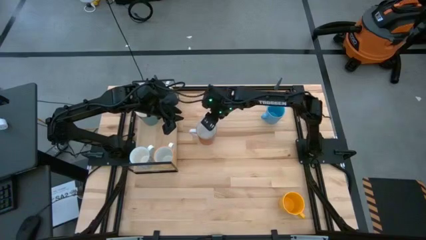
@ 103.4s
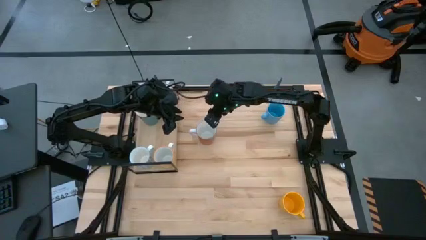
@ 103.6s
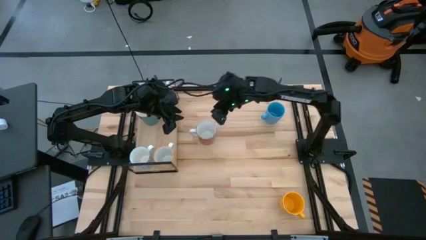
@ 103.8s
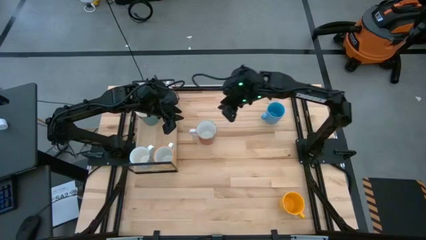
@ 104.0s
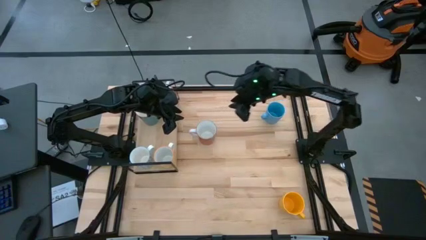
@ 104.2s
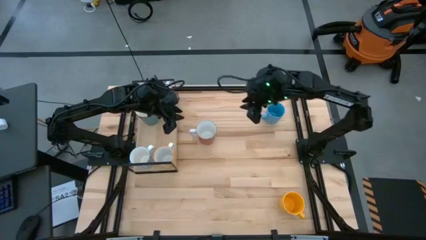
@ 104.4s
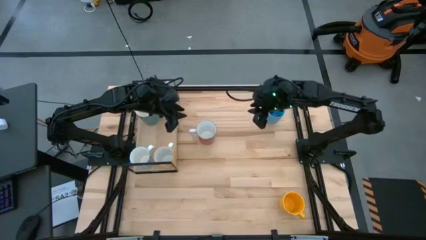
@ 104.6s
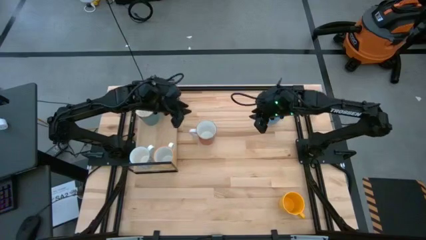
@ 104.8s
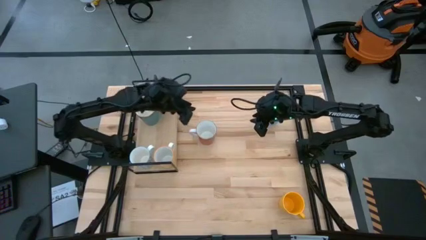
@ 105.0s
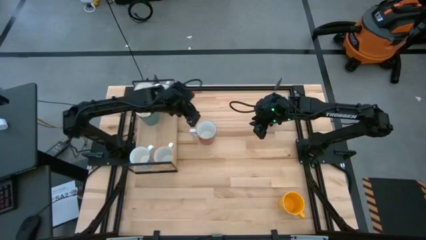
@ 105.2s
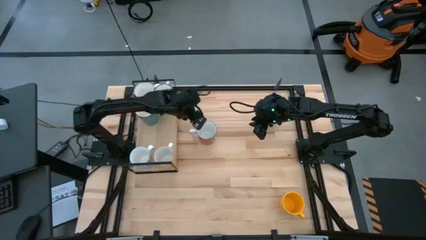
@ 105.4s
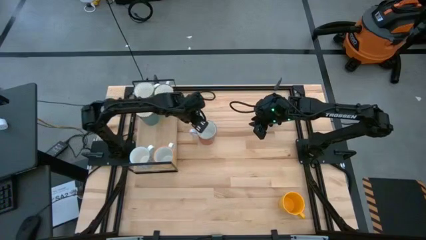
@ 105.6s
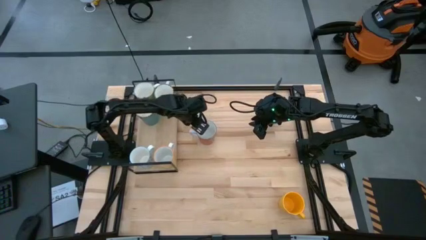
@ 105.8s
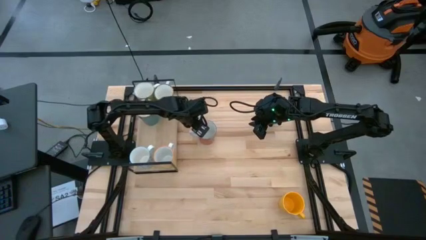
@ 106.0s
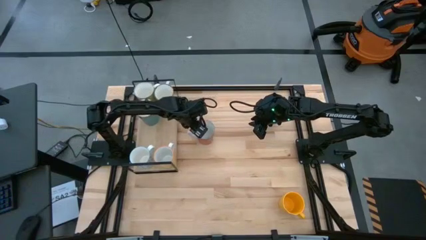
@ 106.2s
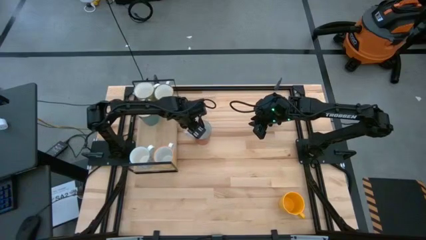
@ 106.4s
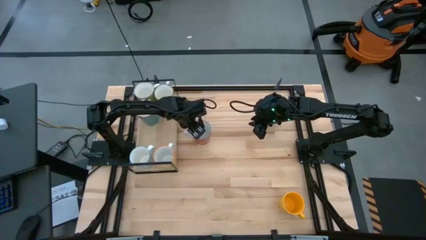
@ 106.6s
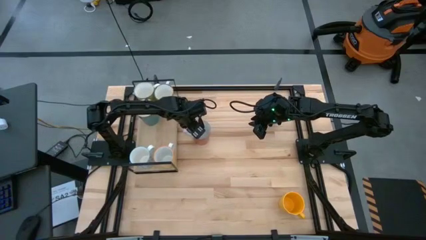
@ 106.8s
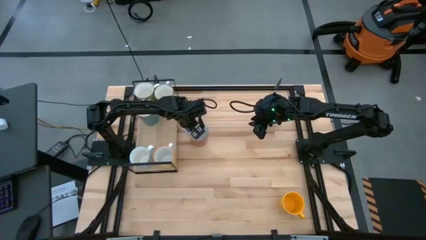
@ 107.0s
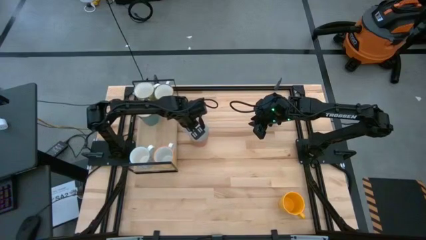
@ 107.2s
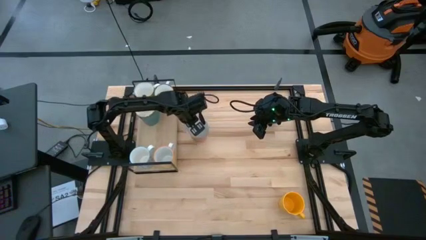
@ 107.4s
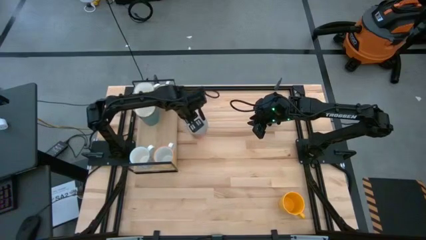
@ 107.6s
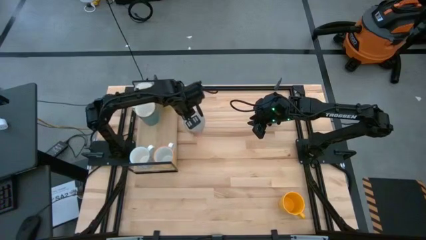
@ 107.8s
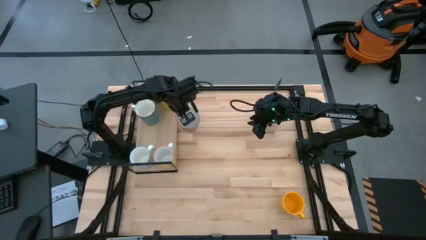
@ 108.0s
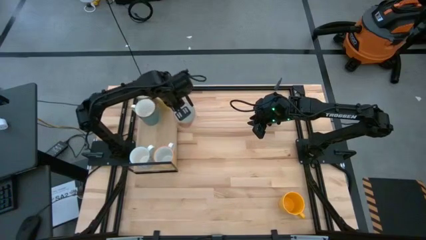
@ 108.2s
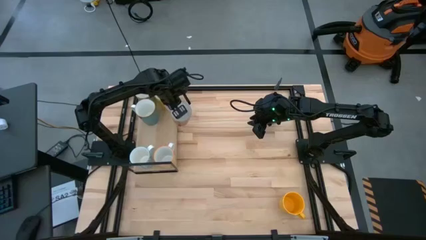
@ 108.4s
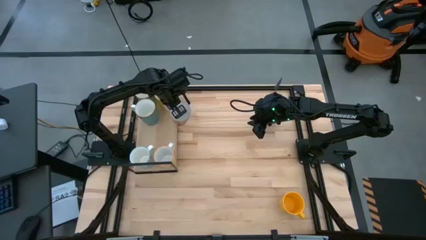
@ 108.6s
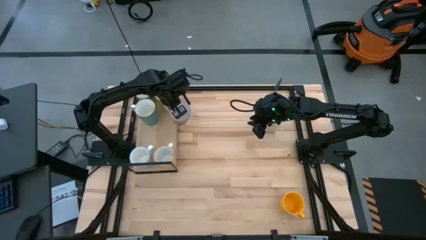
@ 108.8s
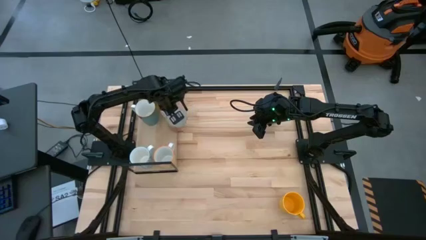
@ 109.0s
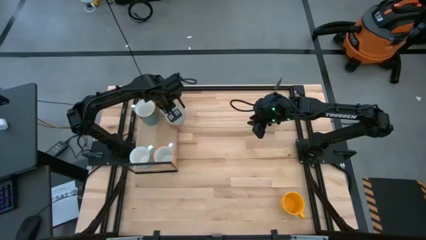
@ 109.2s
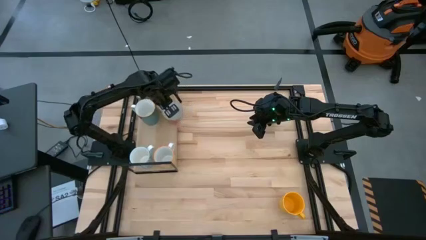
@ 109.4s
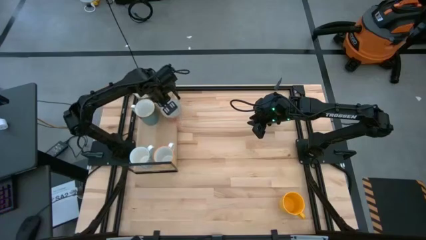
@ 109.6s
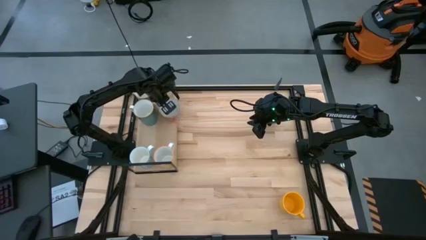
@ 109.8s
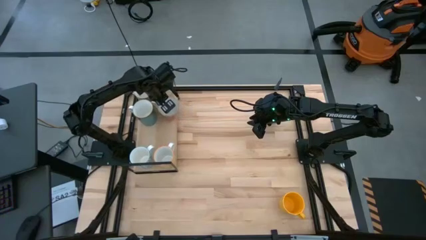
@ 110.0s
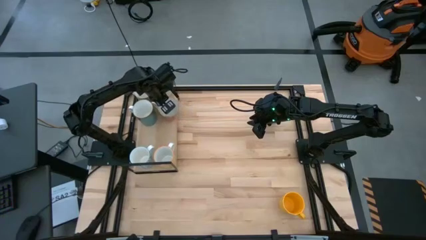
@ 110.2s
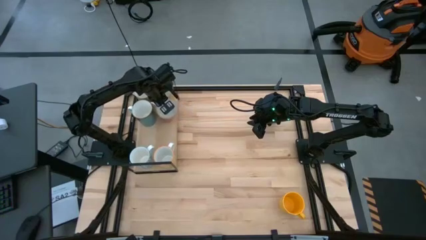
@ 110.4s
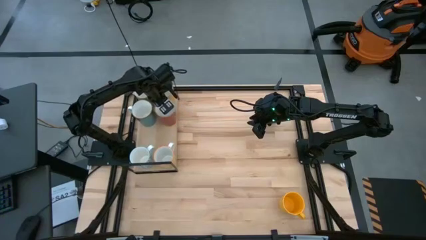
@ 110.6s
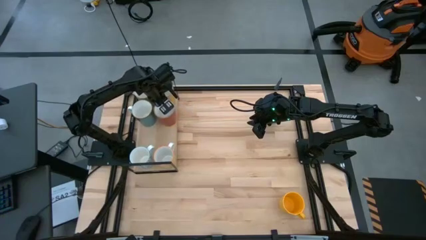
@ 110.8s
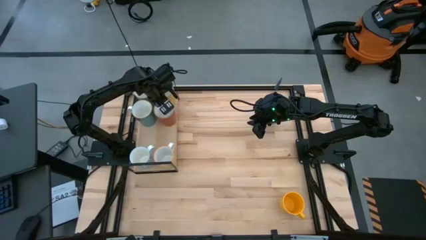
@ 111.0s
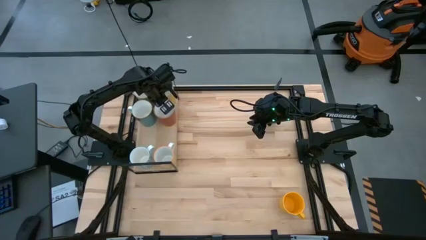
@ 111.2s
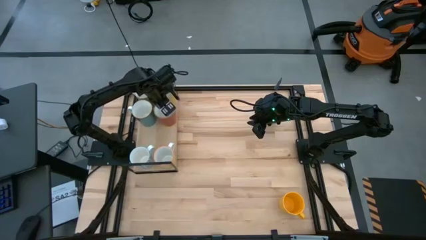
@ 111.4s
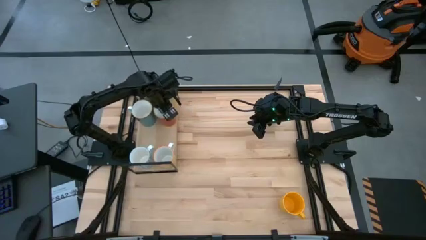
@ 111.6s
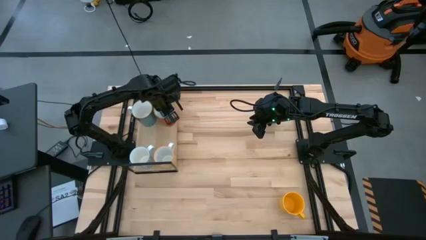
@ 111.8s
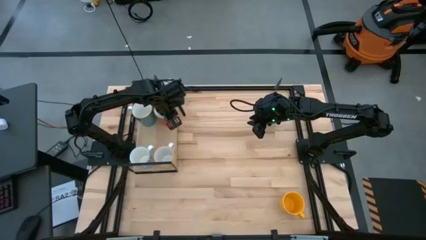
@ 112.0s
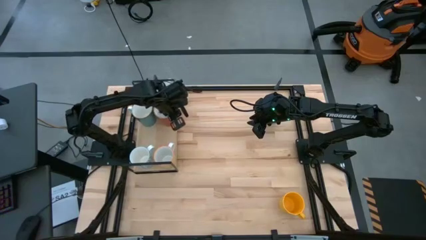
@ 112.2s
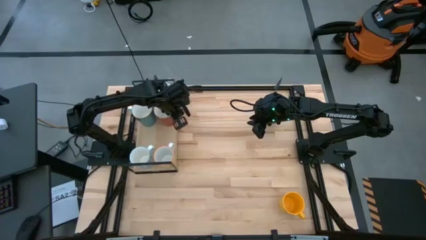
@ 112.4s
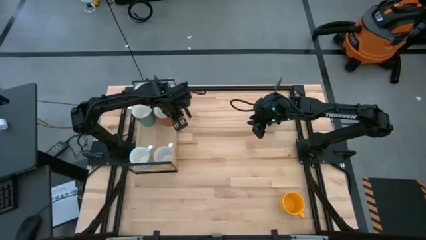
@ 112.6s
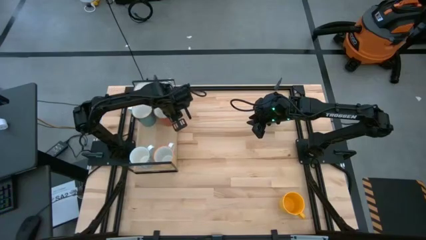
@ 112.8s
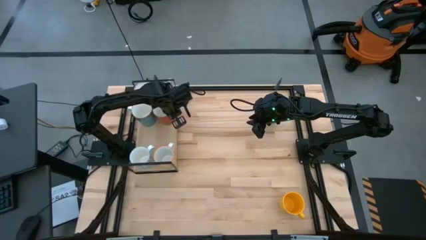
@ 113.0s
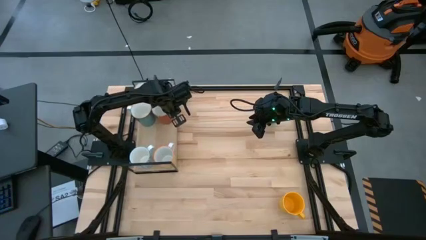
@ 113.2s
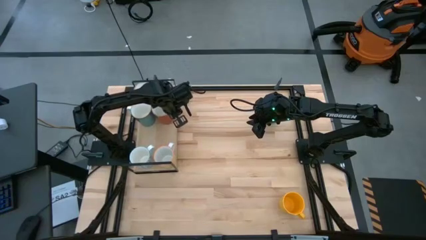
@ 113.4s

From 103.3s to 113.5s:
Task: Place coffee mugs
Put the red mug on the shelf

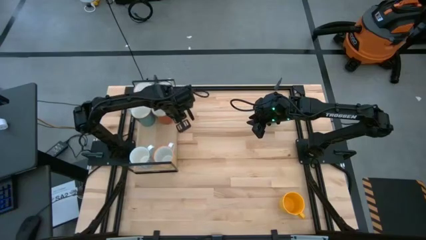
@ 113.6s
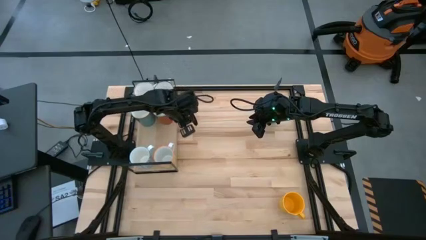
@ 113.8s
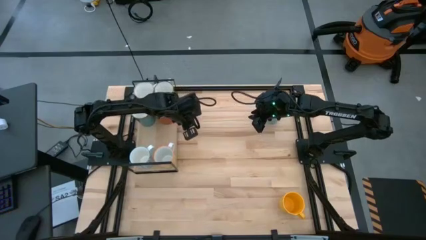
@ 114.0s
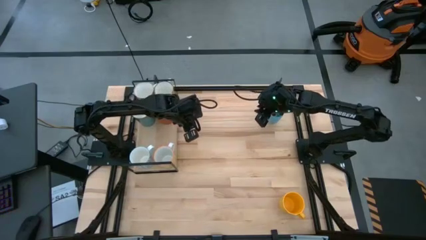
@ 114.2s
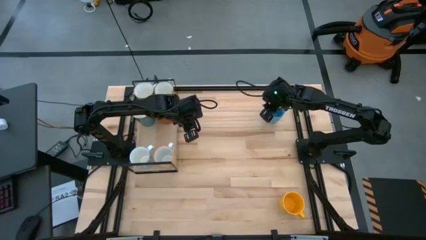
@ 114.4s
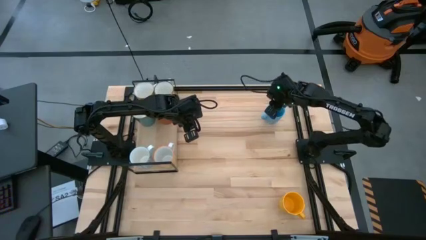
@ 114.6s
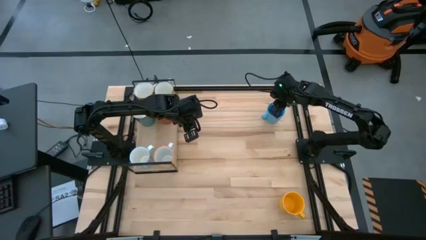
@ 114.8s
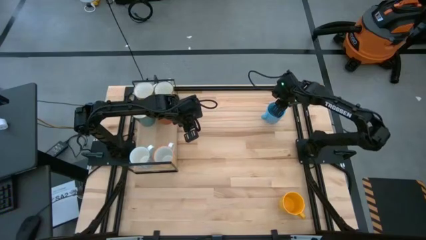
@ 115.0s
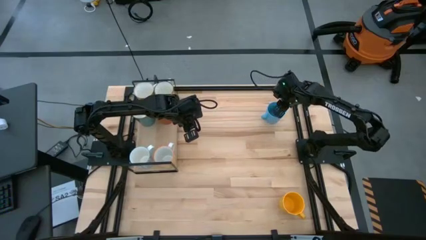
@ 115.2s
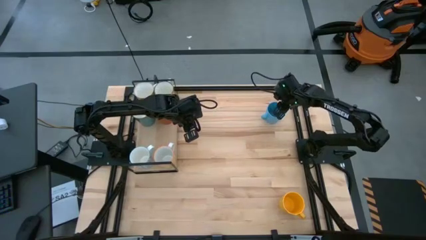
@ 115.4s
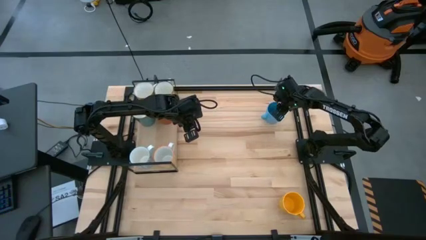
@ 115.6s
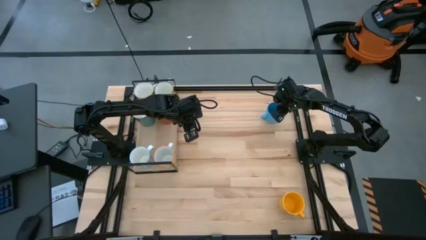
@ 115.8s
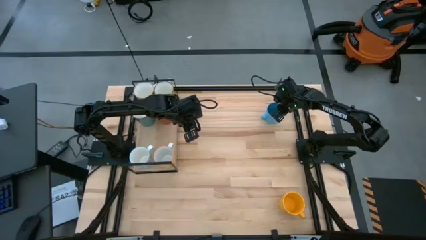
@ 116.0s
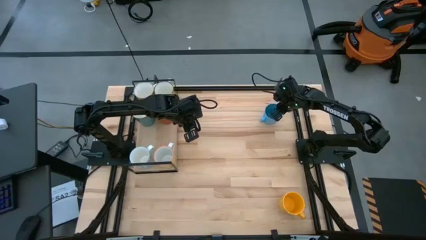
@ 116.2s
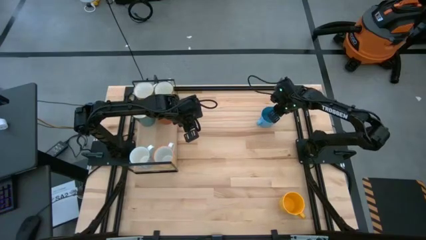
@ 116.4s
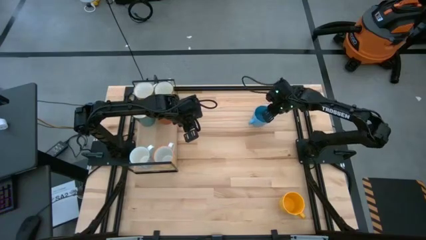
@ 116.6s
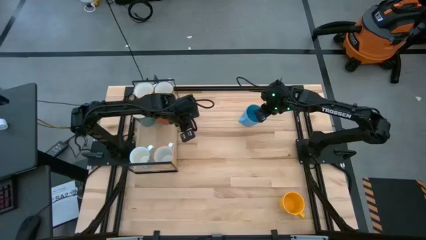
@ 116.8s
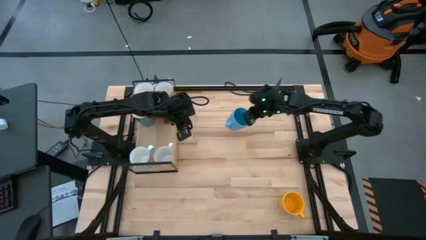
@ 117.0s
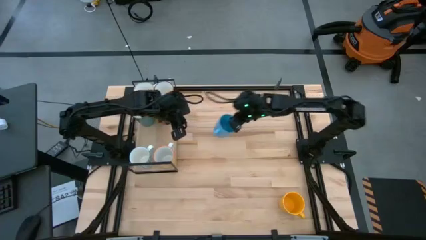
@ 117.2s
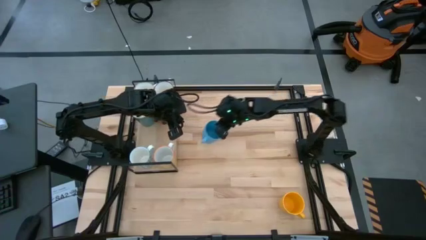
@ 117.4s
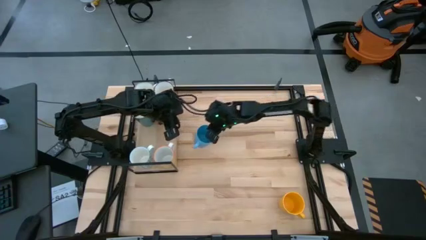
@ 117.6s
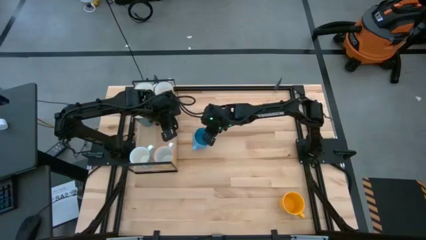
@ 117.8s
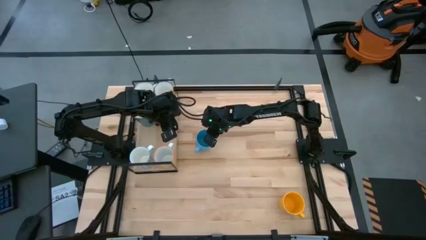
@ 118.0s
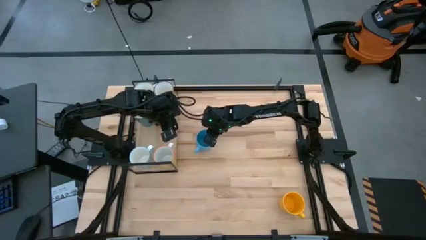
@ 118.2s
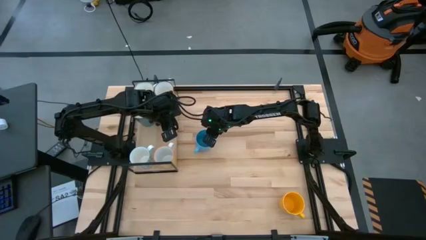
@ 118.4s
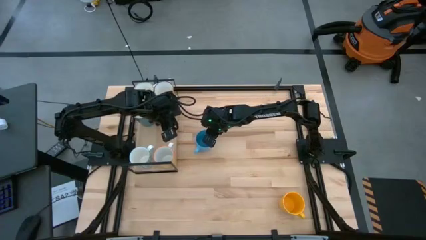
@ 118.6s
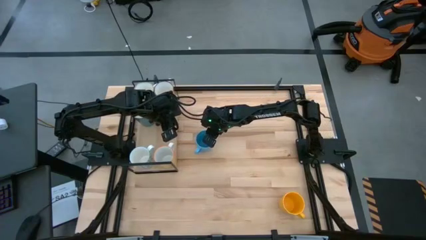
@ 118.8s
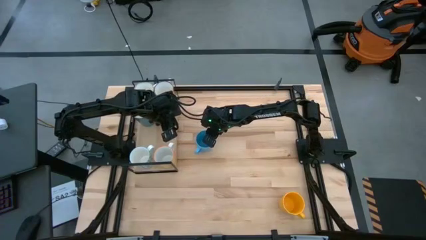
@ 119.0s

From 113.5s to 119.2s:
Move the blue mug to the center of the table

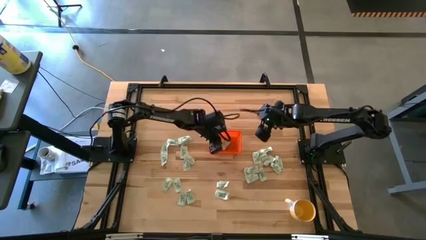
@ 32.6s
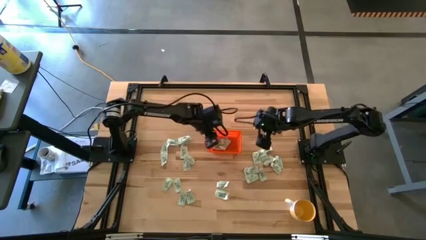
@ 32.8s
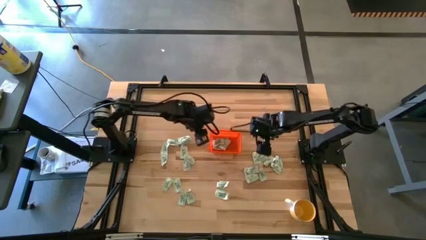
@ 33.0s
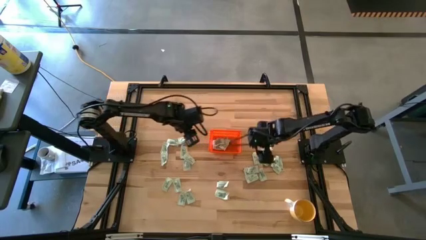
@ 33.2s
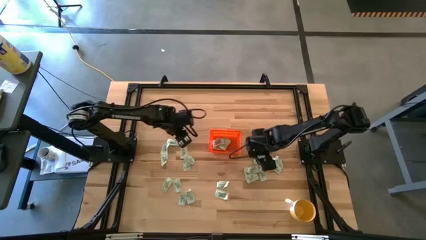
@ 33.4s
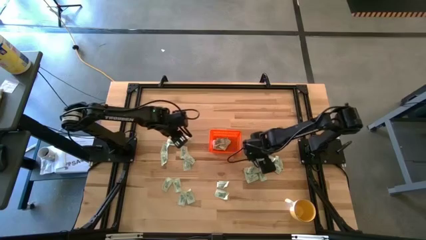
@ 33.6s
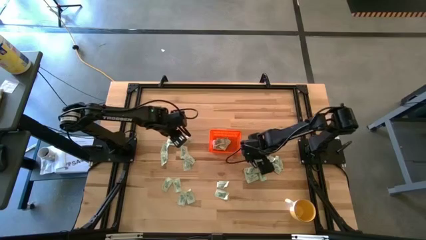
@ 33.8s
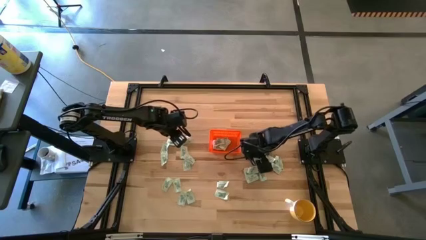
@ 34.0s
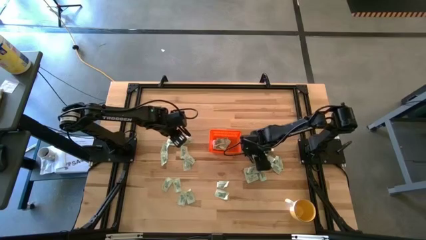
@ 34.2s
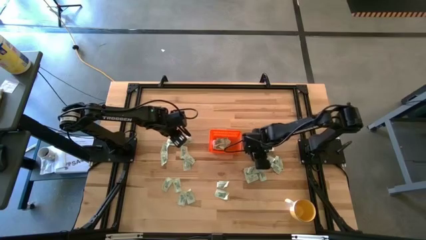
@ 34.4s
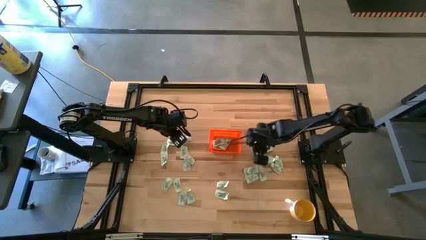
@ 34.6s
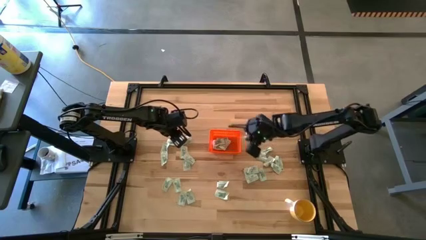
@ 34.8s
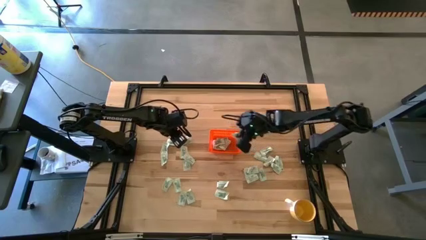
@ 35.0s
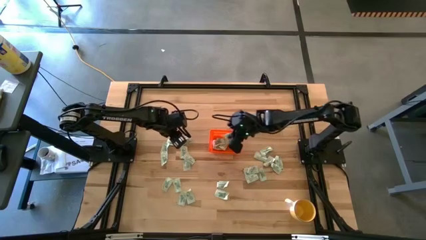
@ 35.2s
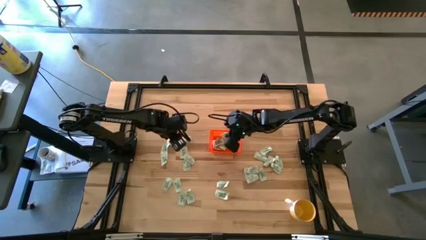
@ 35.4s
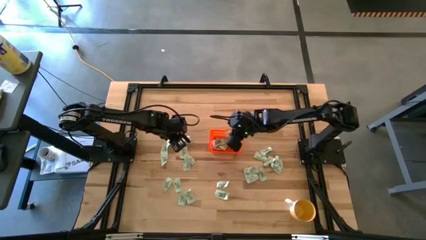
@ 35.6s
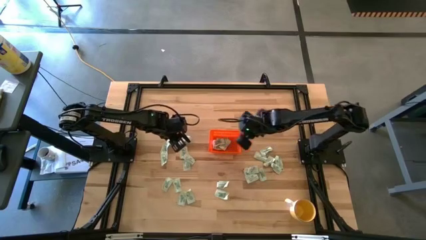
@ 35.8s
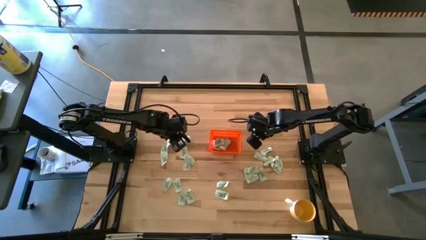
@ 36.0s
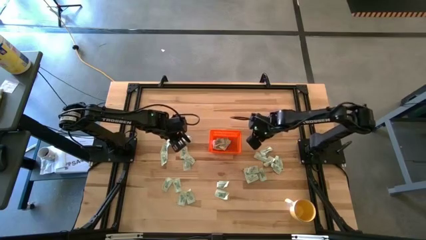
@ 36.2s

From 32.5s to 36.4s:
Task: Pick and place Stevia / Truvia into bins
Put the light green stevia packet into the orange basket
